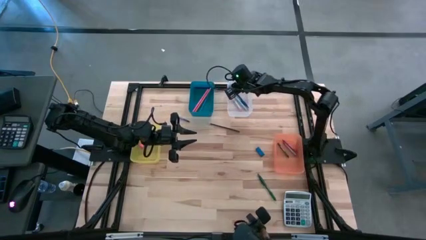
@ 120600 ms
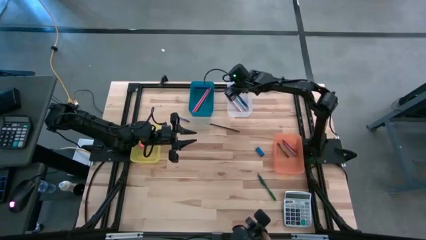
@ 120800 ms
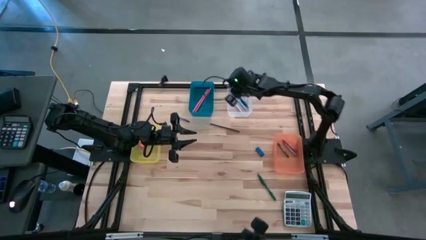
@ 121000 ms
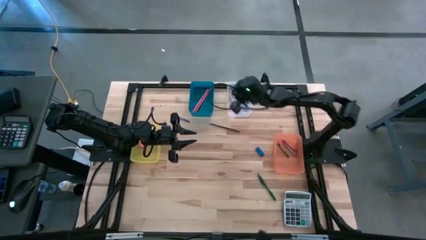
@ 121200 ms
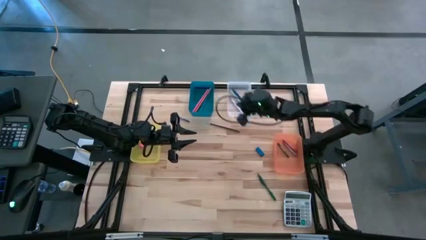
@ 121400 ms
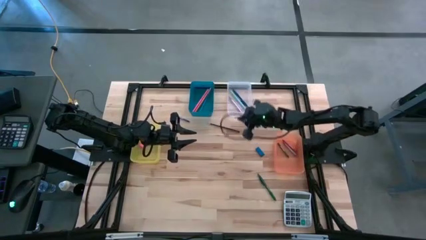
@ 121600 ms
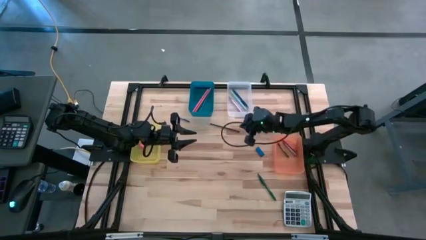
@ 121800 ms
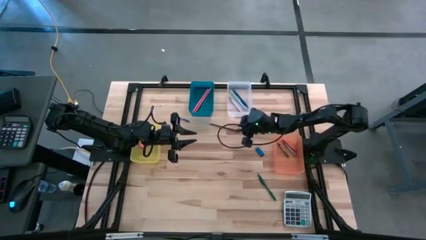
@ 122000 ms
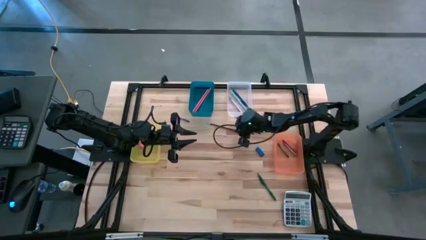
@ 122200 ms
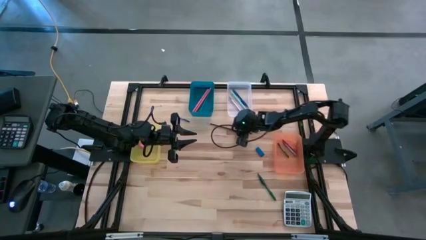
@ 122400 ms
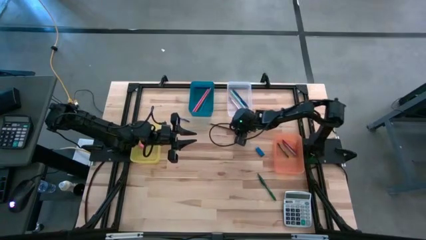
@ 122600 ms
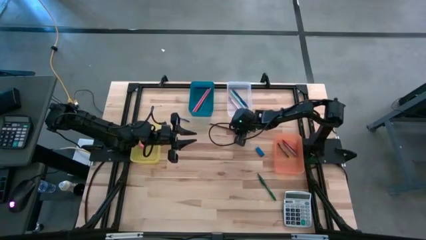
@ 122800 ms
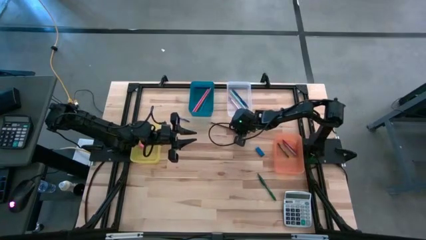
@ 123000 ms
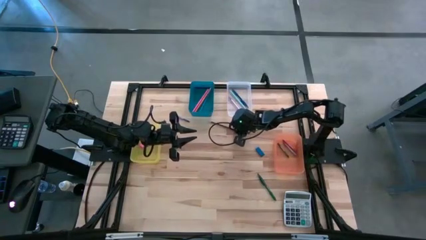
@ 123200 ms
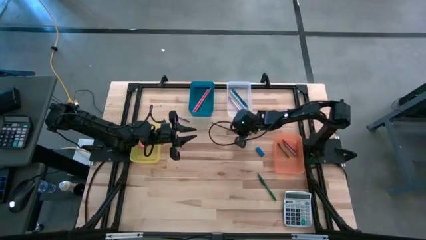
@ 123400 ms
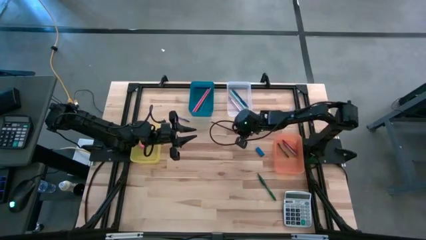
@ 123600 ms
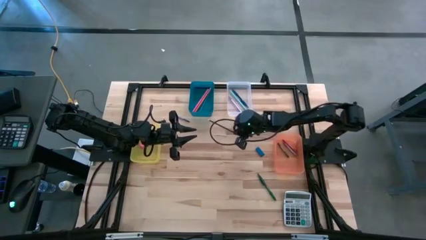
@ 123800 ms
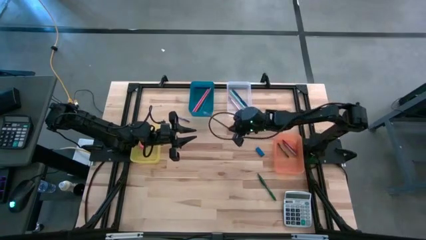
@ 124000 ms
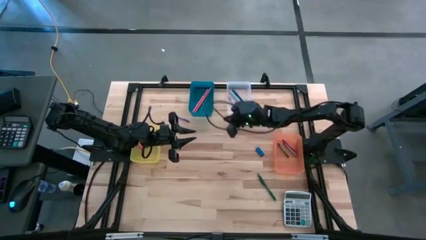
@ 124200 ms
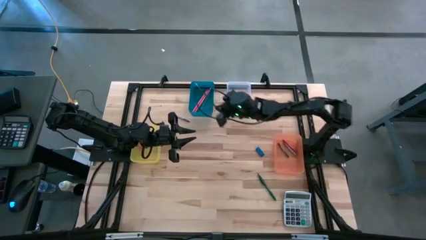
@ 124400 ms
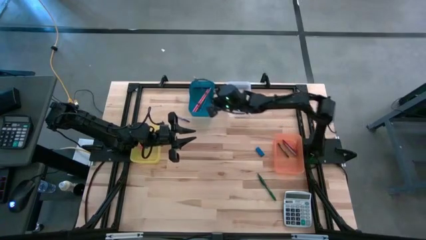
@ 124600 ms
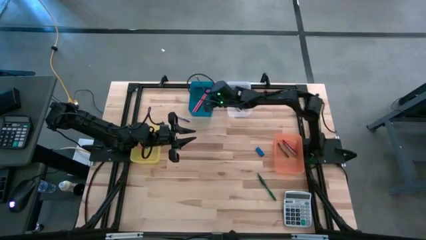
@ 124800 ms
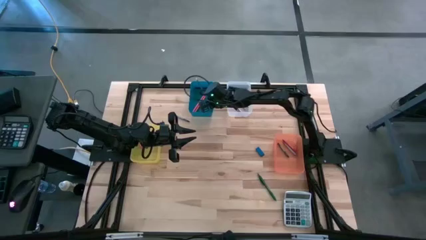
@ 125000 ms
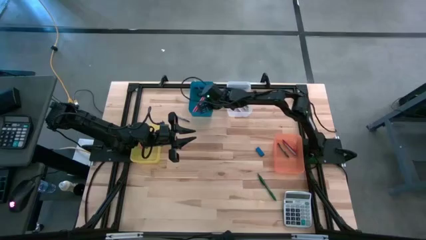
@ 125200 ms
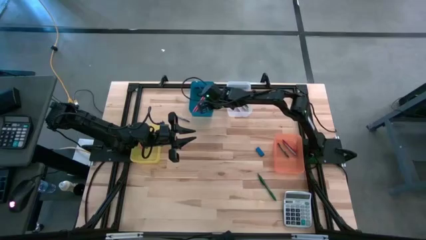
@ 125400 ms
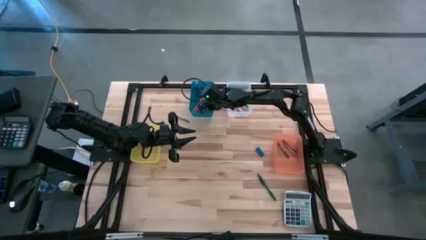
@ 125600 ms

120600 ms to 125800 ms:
Task: Sort crayons/erasers/pens/pencils in bins
Put the black pencil into the blue bin

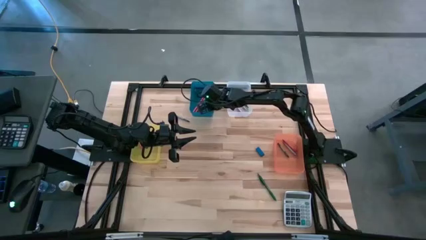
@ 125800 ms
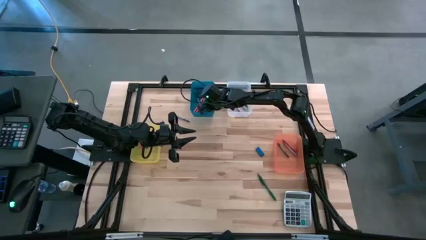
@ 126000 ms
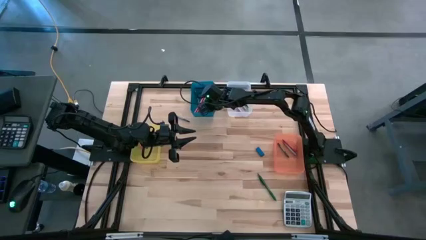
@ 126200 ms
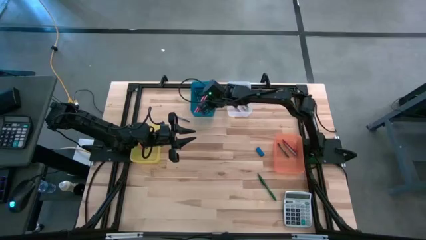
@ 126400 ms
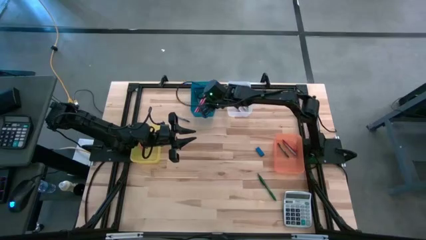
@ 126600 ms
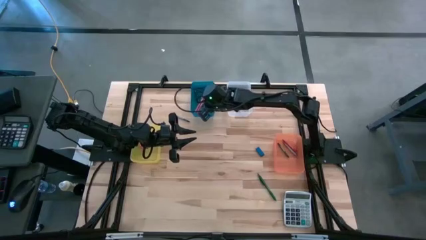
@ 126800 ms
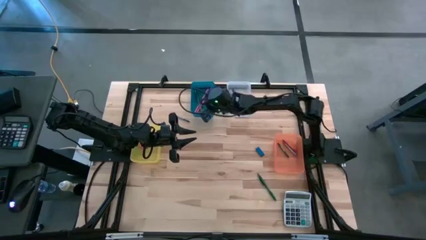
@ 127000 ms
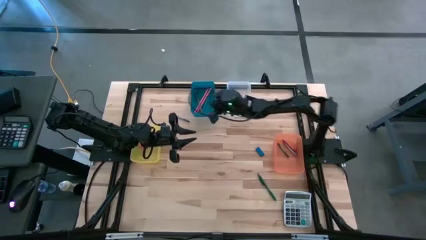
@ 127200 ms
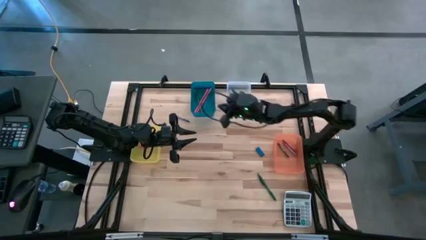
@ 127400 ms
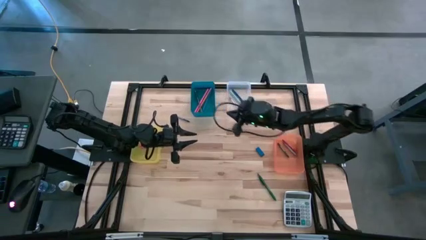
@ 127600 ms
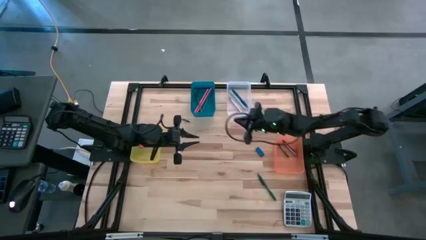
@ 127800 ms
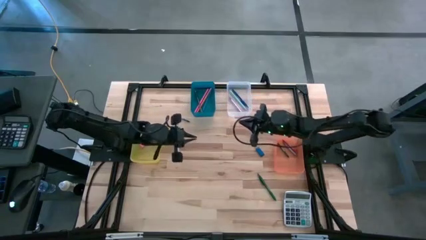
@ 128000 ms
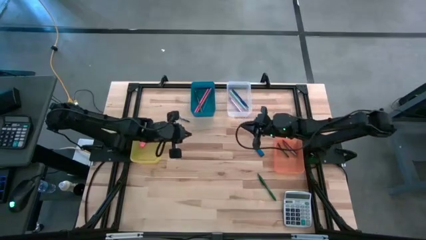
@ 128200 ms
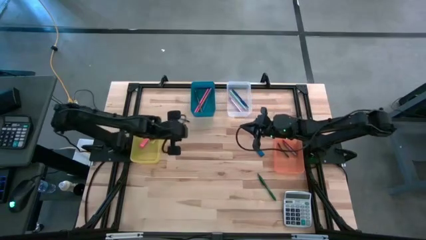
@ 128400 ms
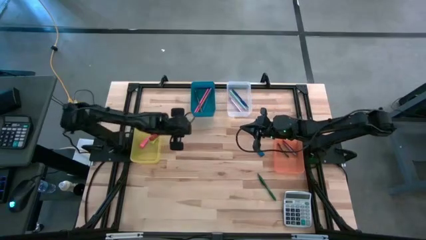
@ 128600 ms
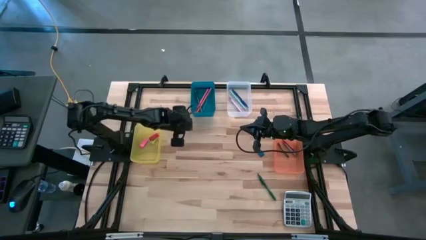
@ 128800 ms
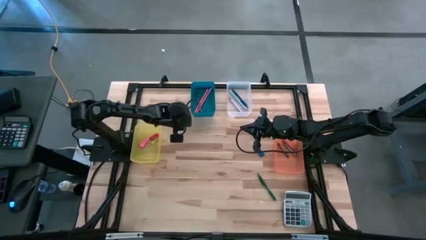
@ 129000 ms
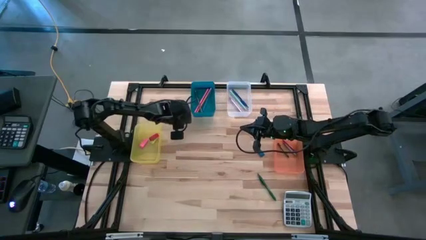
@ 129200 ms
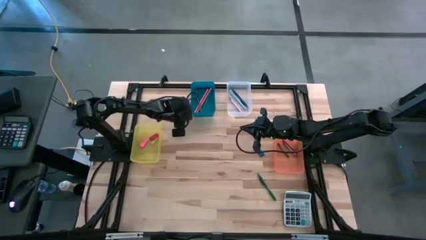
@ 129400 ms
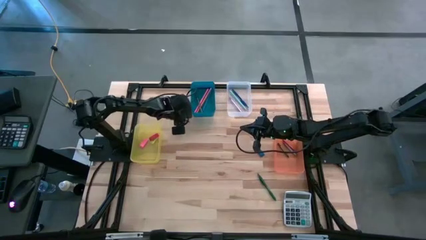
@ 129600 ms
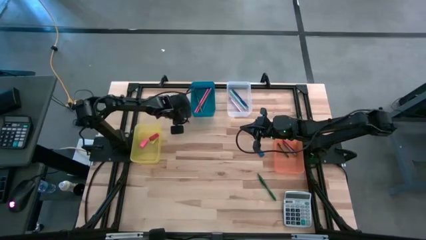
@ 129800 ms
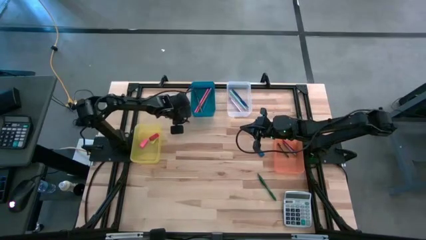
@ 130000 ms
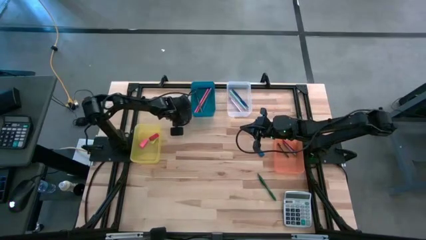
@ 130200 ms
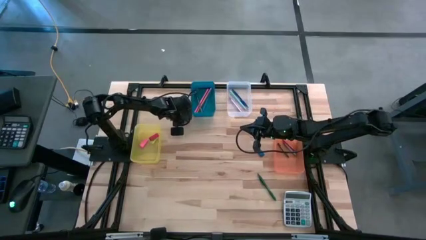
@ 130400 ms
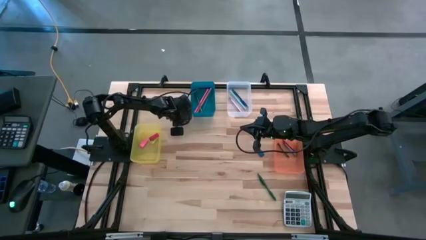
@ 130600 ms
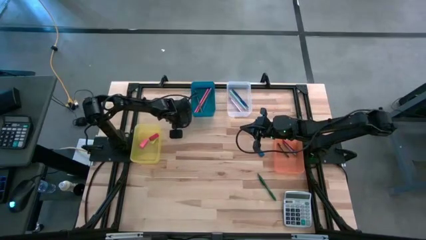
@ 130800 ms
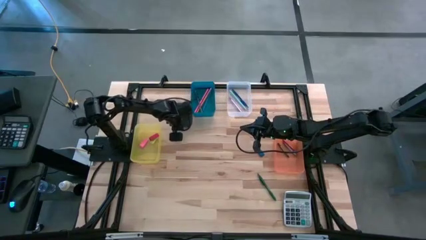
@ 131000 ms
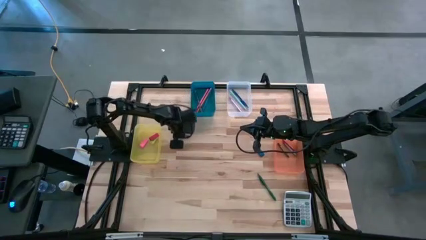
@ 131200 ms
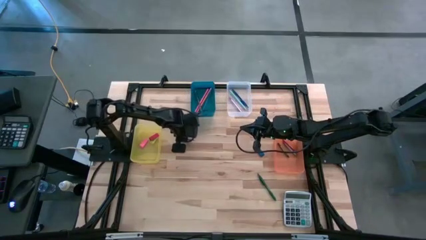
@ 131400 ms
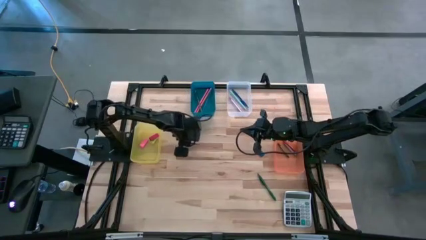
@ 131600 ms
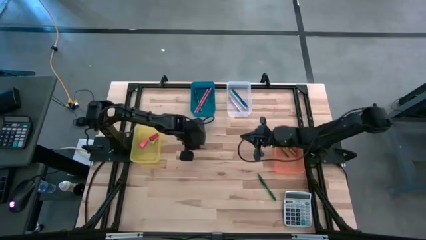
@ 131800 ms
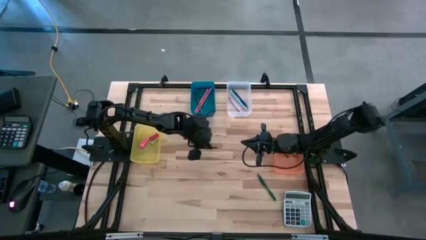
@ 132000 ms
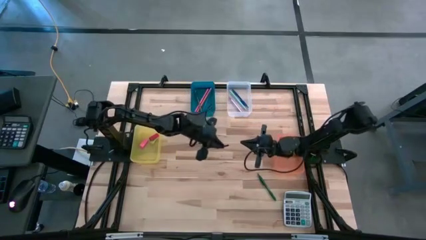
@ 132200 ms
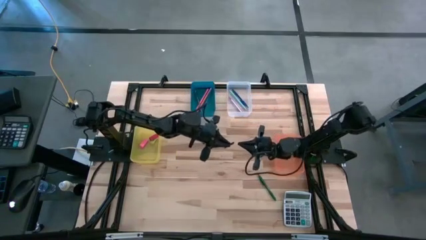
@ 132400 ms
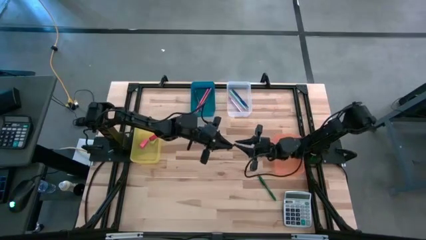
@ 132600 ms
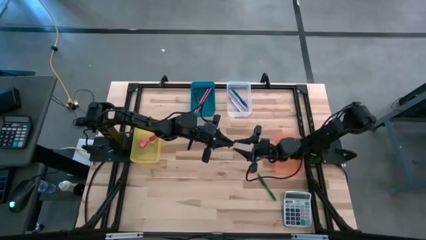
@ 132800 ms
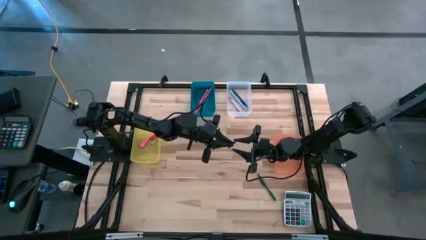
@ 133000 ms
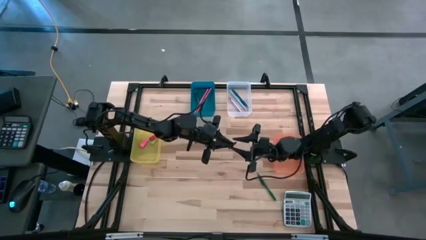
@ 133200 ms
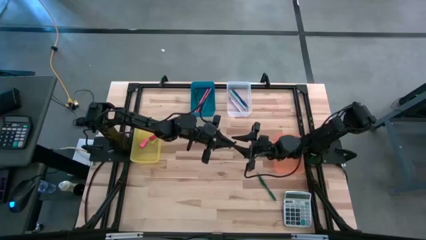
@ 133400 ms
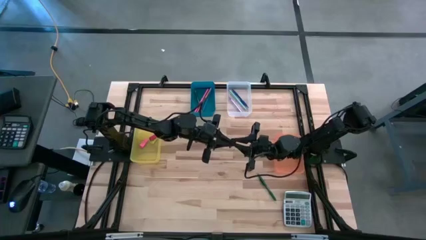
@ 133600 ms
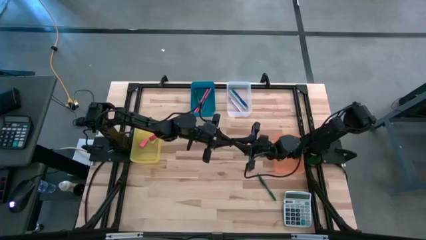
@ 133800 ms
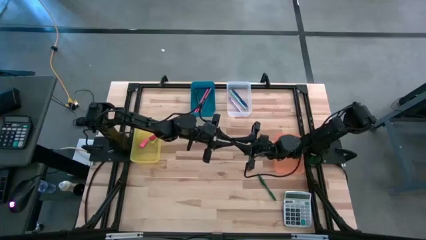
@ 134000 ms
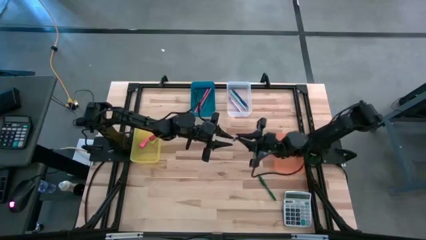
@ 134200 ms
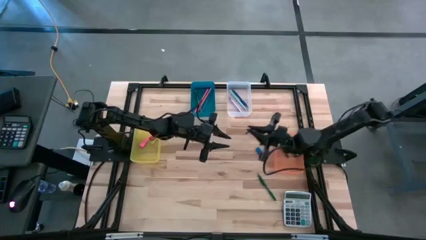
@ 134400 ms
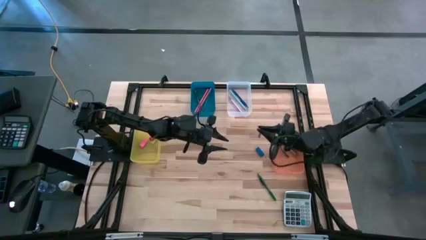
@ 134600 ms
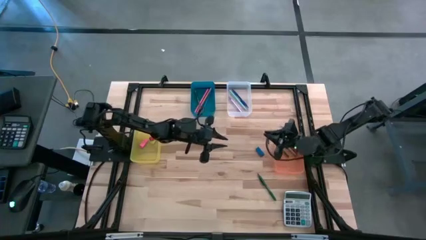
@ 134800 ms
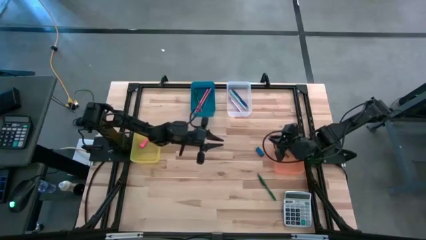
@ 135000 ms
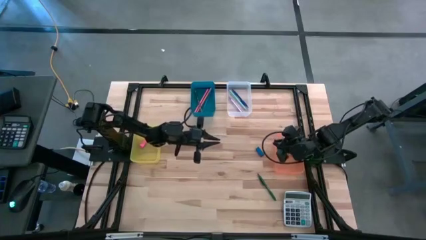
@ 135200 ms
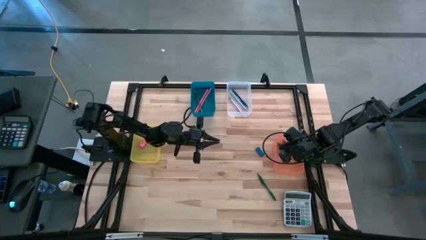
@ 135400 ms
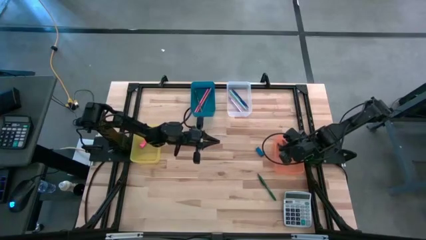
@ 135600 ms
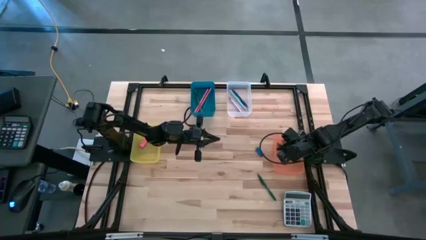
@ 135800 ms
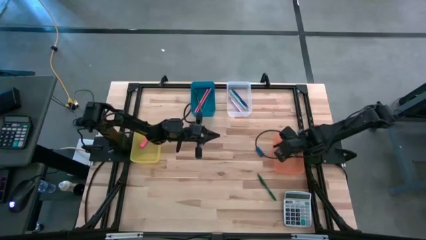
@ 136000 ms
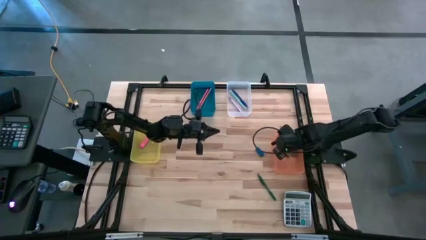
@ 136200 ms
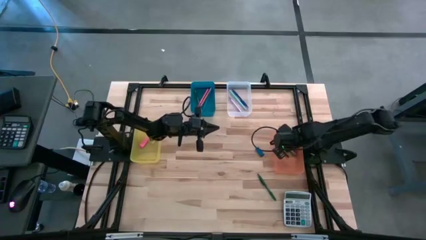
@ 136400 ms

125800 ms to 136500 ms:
Put the blue crayon into the orange bin

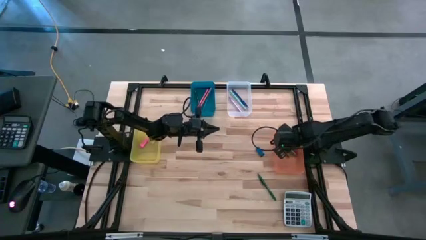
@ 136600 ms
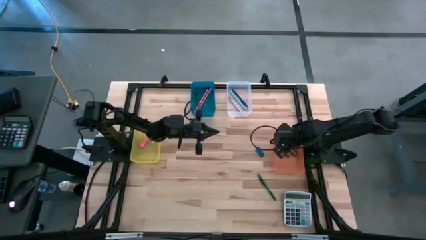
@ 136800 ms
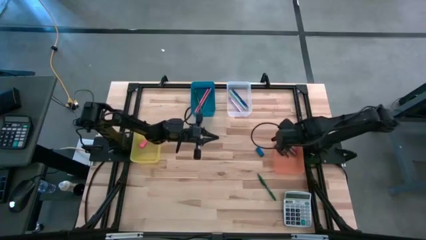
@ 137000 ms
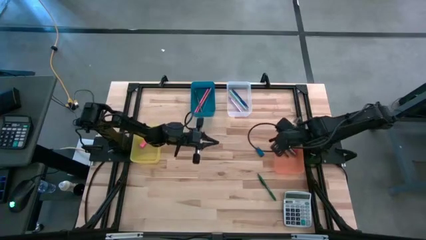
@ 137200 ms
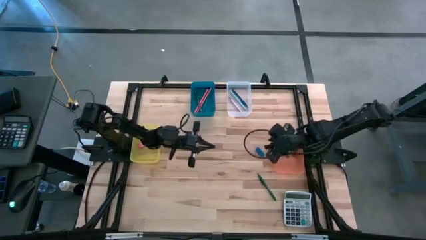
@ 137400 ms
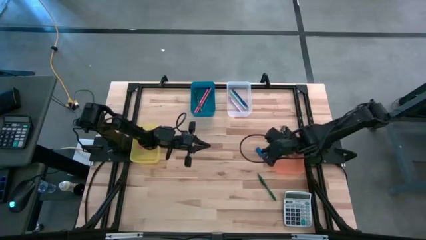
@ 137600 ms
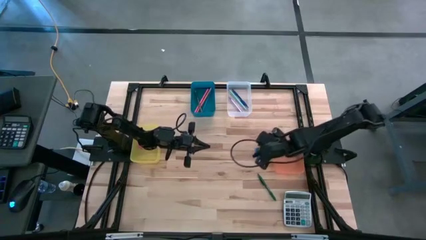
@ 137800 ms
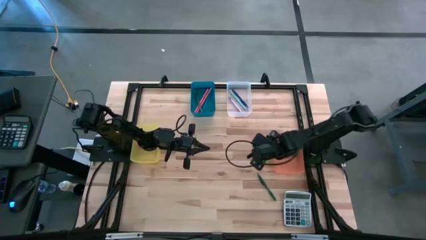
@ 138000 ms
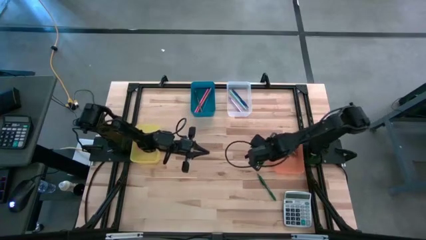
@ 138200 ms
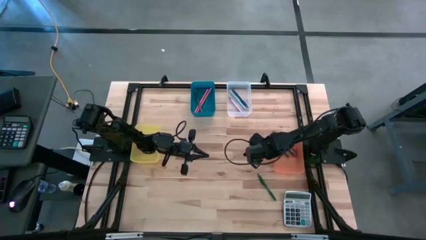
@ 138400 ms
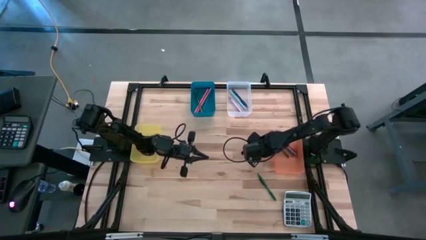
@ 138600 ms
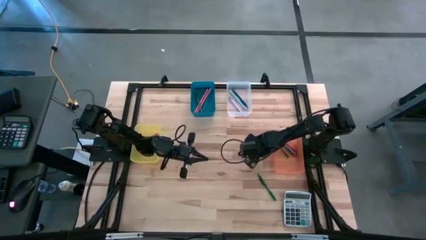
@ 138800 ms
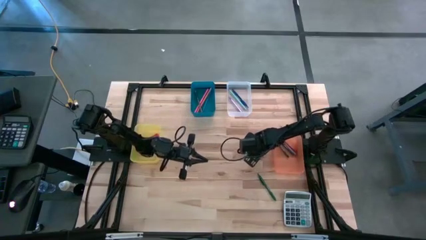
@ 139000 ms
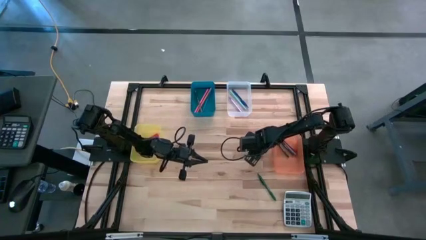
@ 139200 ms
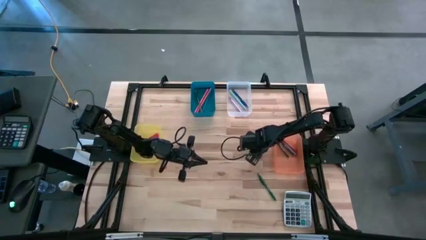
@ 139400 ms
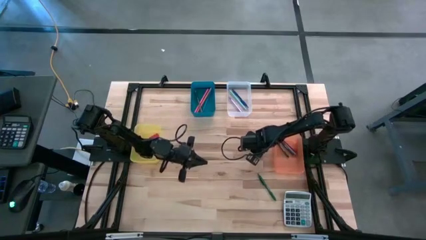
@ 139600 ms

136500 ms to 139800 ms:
Put the blue eraser into the yellow bin
